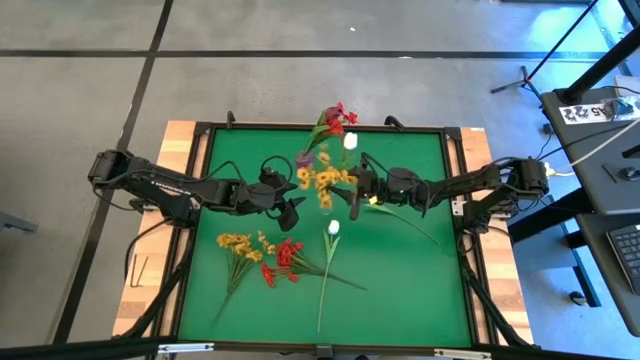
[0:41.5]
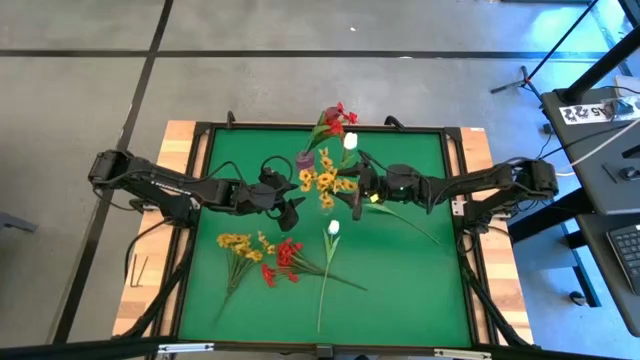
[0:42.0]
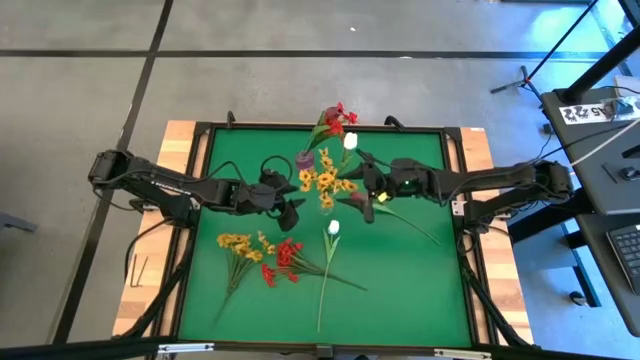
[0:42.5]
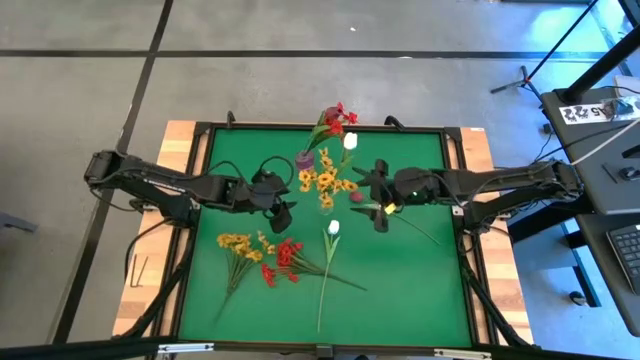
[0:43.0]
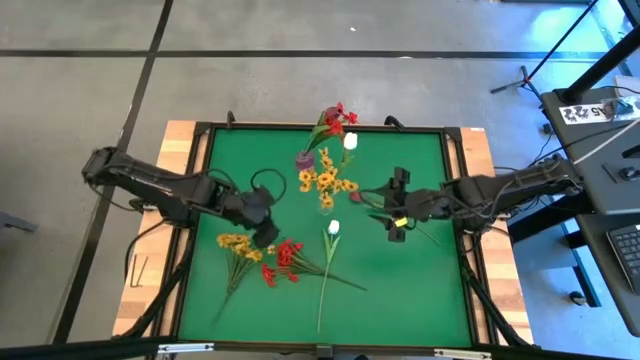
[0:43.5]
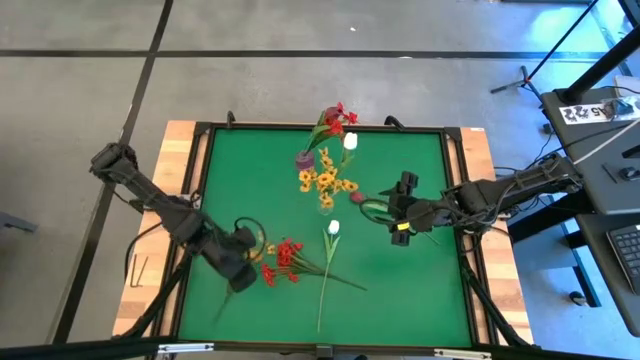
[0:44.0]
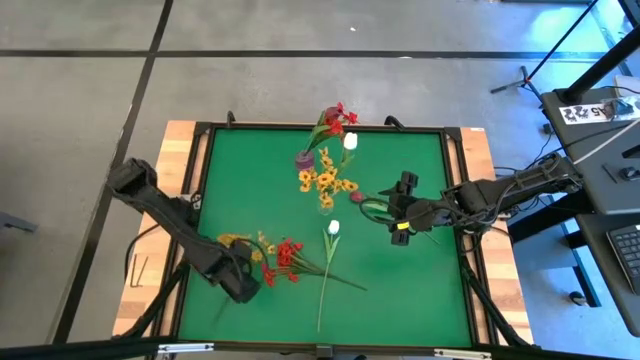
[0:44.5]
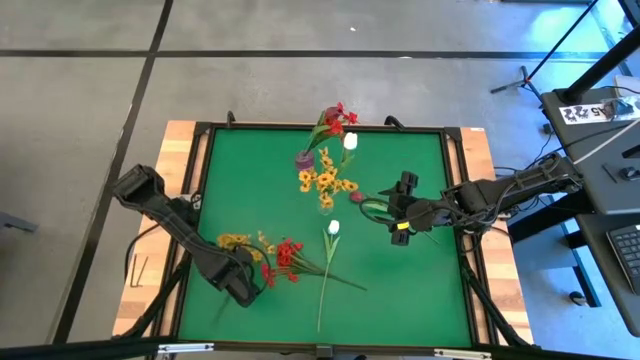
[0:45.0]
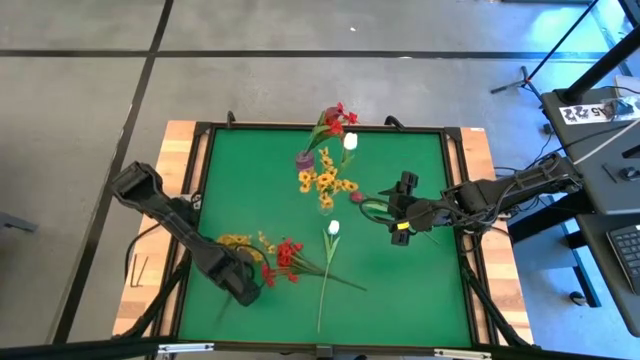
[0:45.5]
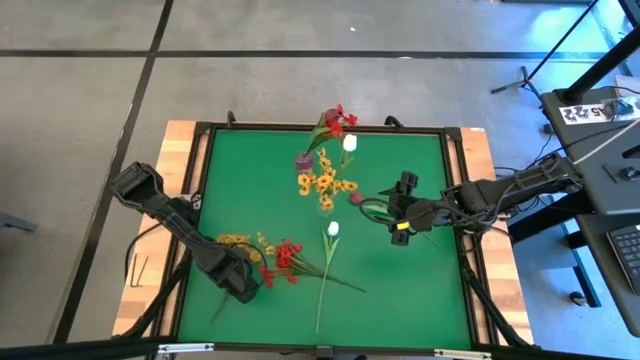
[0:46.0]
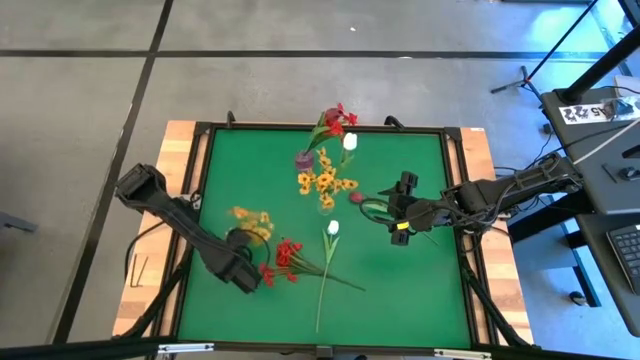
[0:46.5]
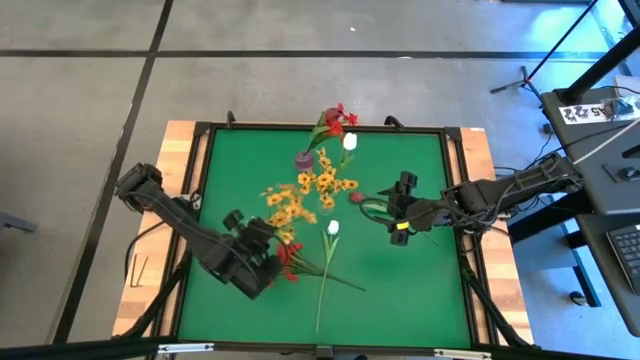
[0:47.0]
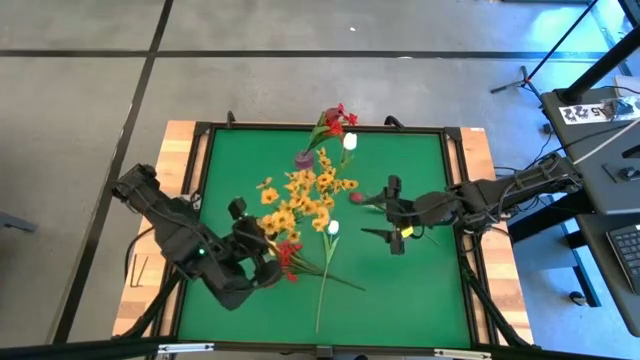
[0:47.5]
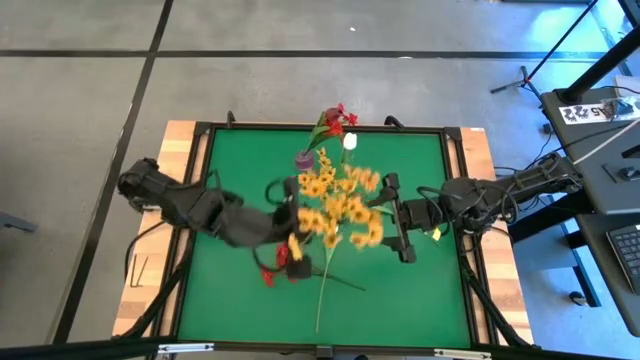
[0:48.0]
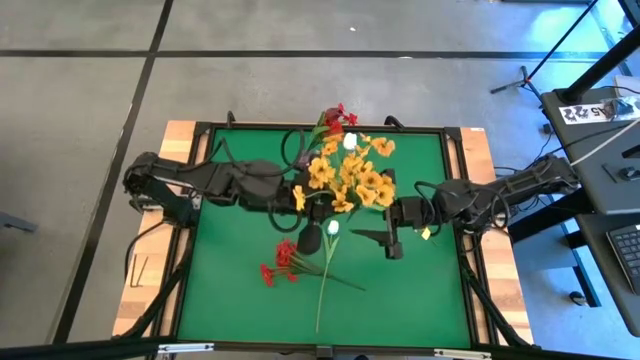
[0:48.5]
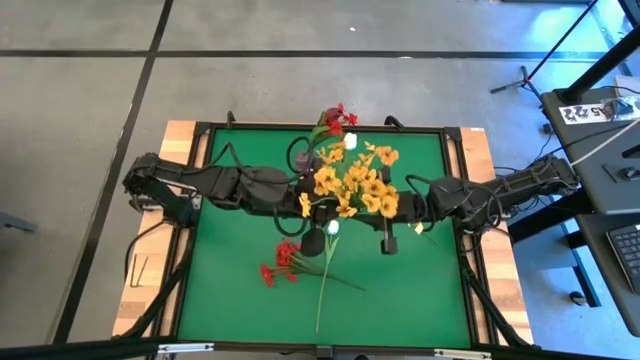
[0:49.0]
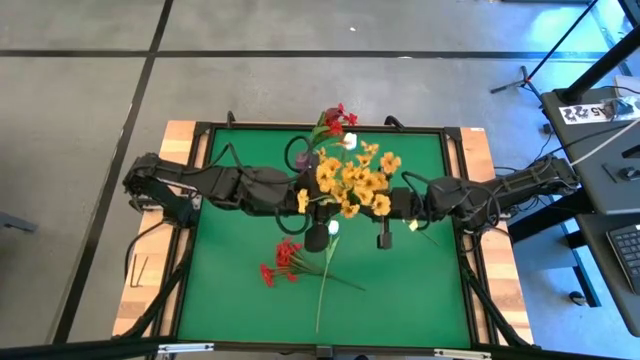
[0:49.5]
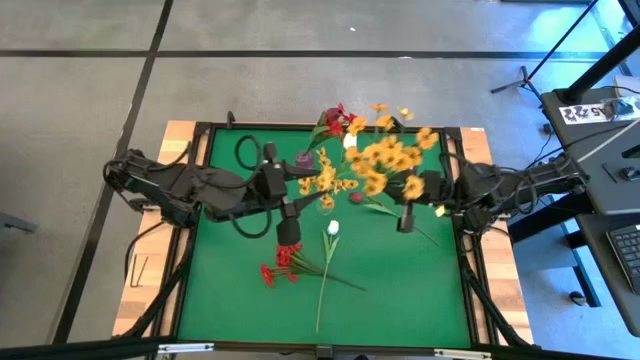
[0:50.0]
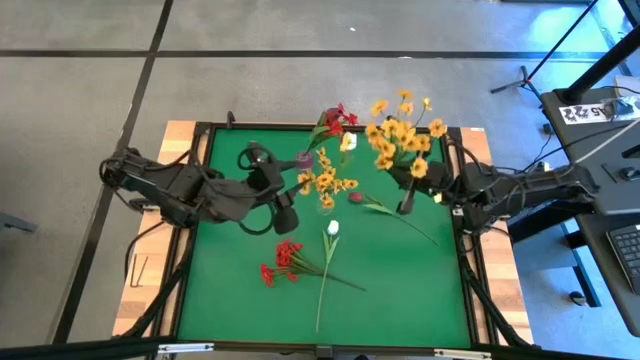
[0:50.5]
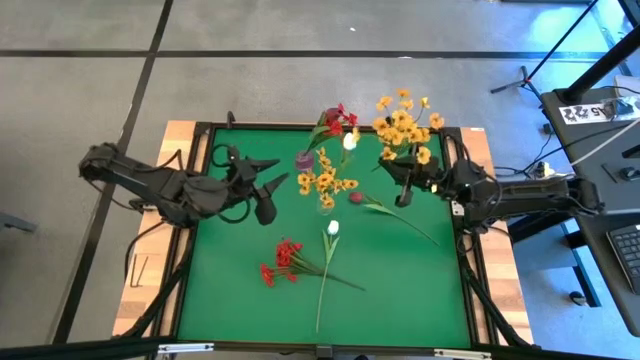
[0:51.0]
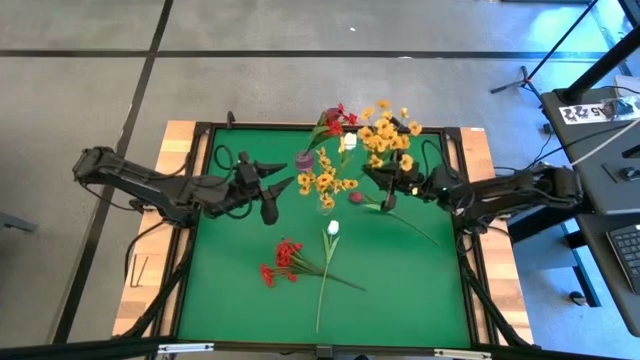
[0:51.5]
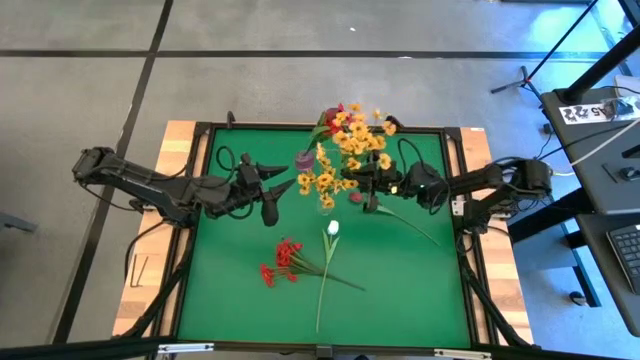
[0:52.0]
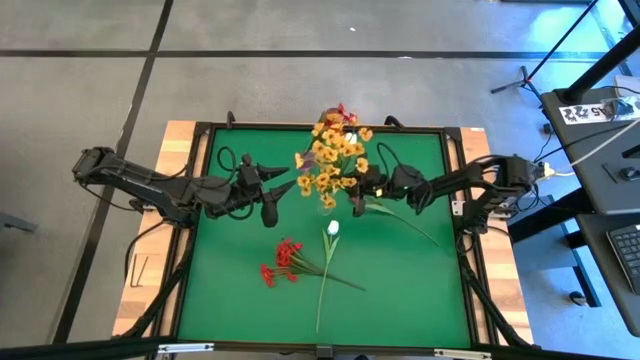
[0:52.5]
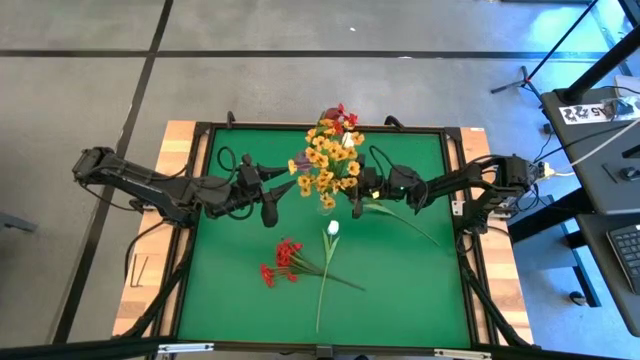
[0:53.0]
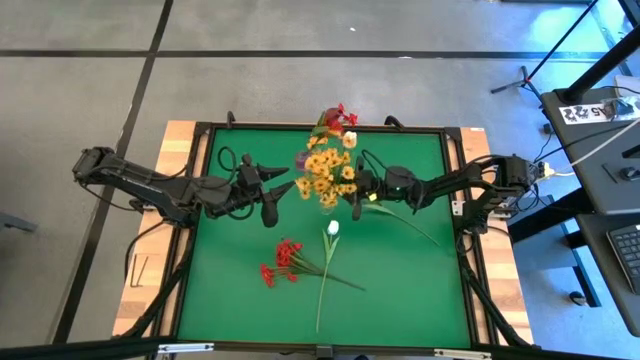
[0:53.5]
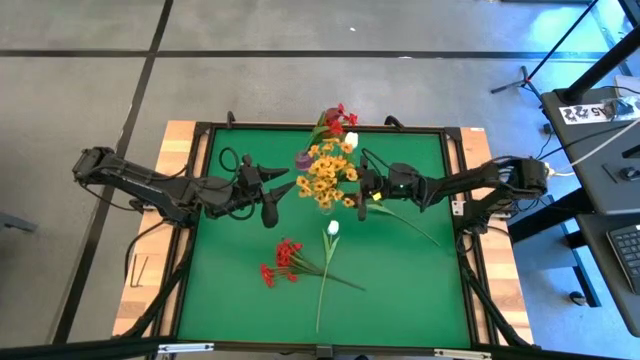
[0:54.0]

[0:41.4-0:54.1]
Task: Sort flowers into vase by color
Put the yellow flowers into the transparent vase

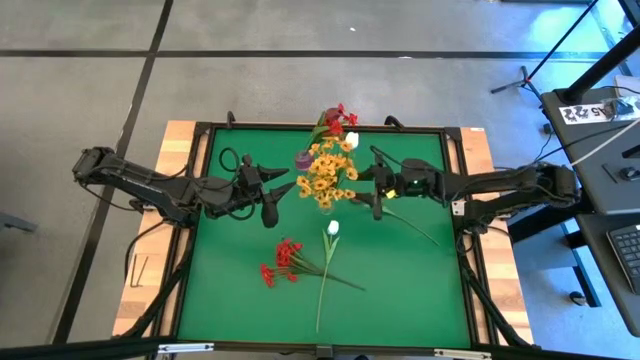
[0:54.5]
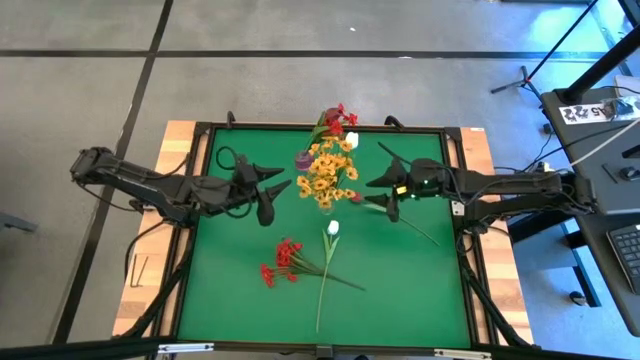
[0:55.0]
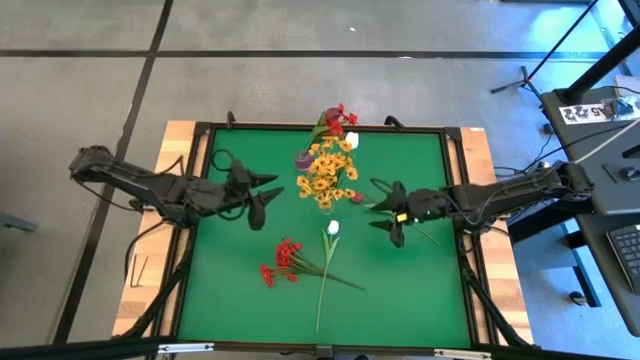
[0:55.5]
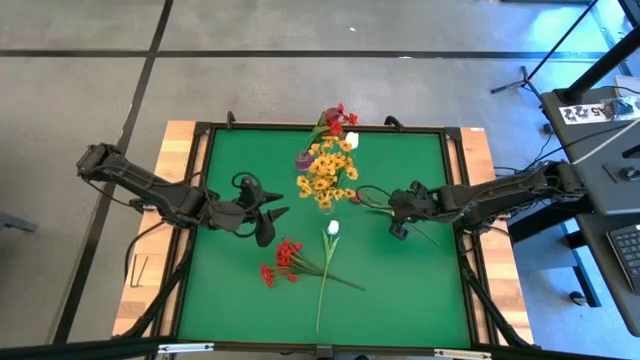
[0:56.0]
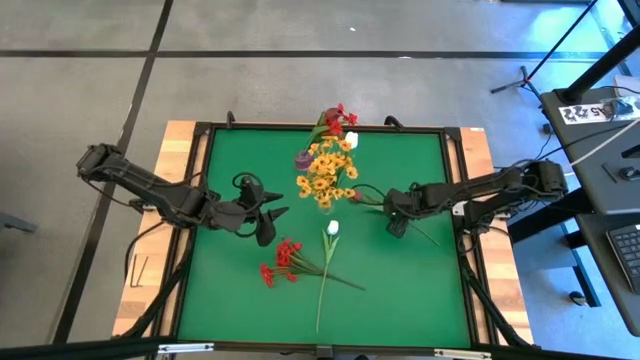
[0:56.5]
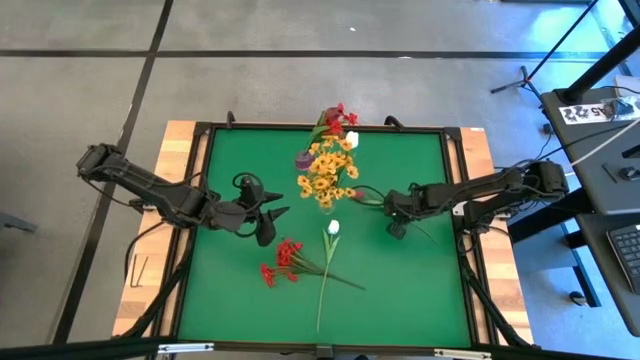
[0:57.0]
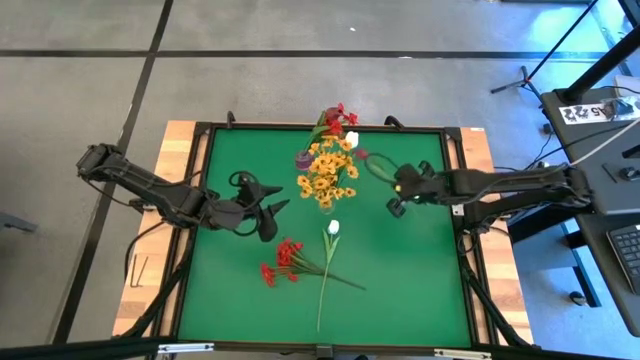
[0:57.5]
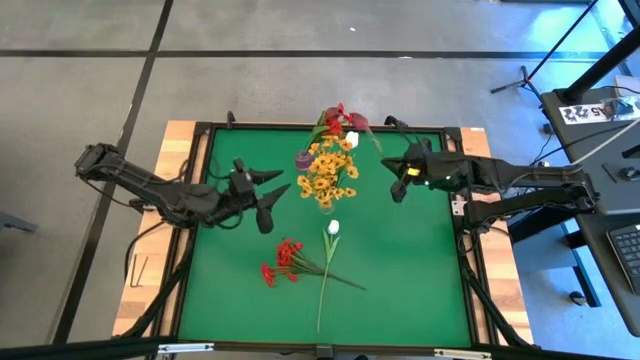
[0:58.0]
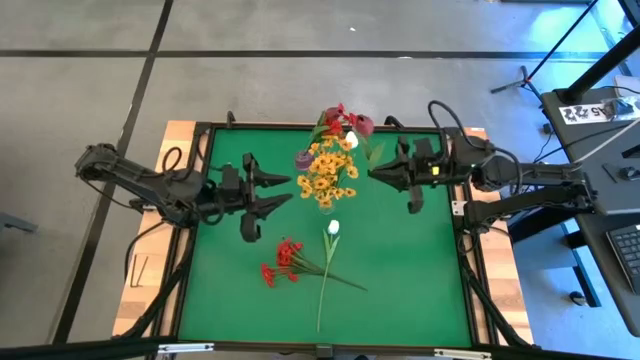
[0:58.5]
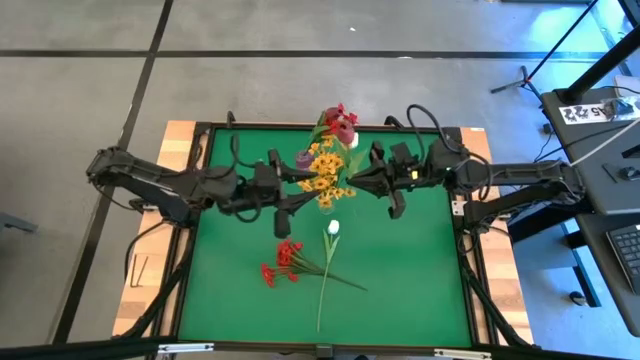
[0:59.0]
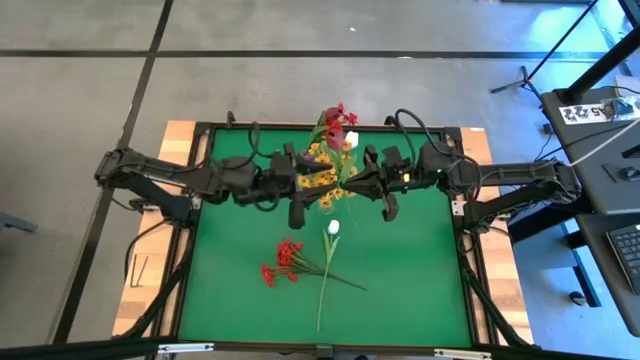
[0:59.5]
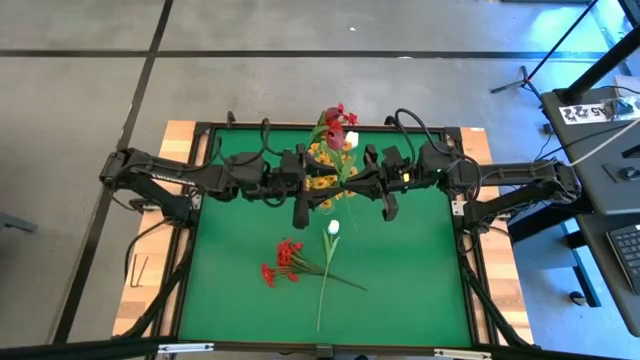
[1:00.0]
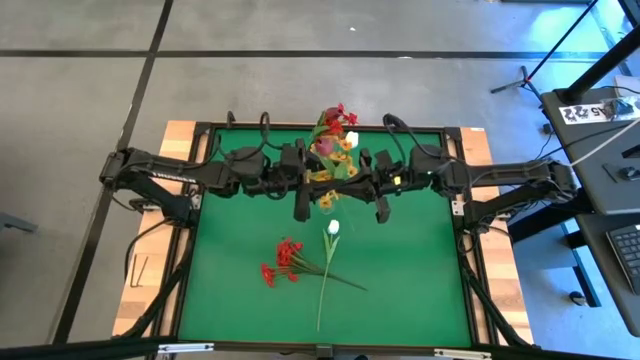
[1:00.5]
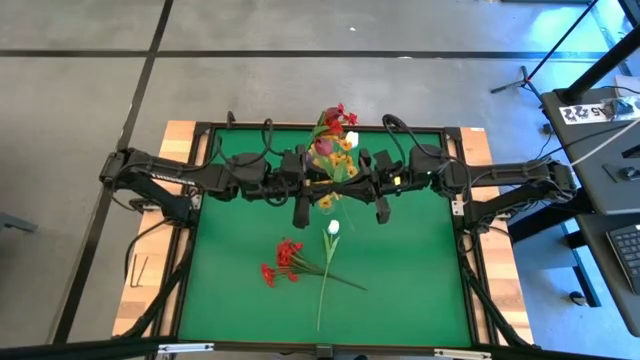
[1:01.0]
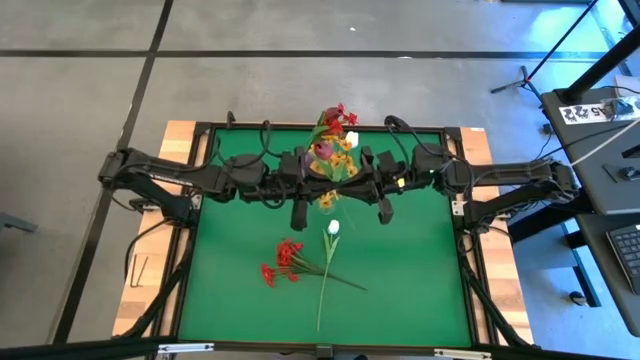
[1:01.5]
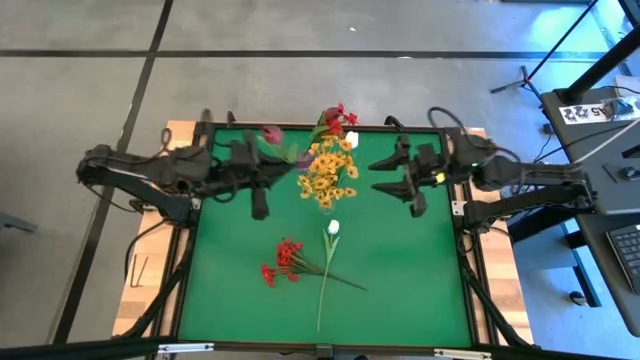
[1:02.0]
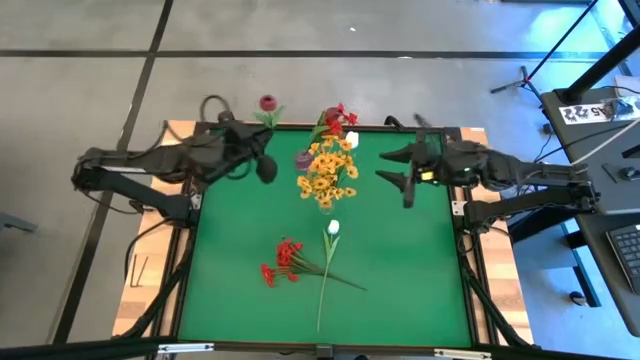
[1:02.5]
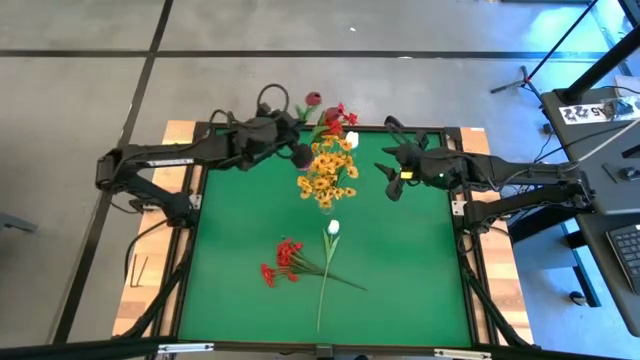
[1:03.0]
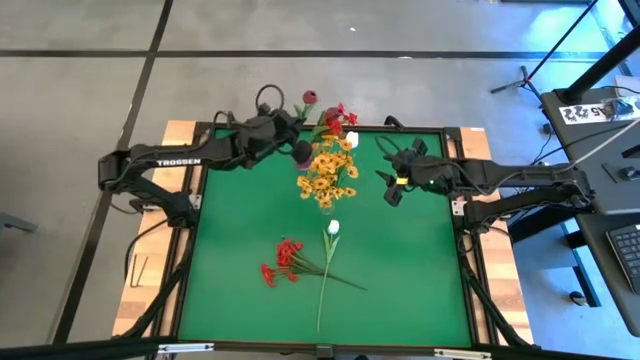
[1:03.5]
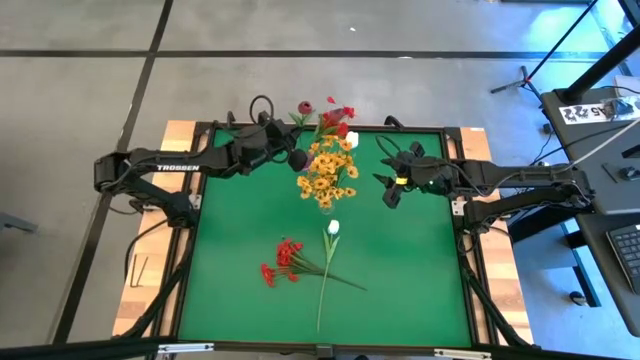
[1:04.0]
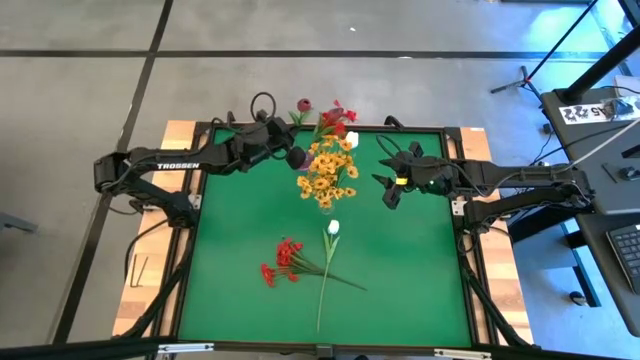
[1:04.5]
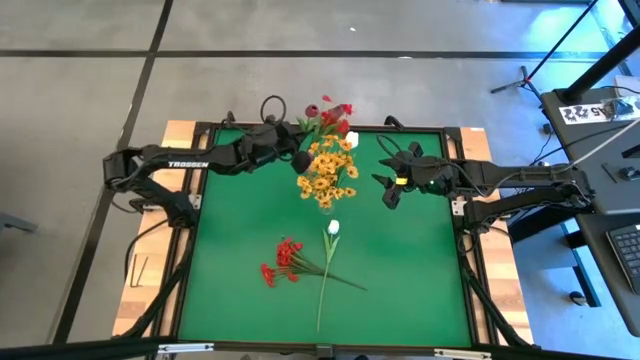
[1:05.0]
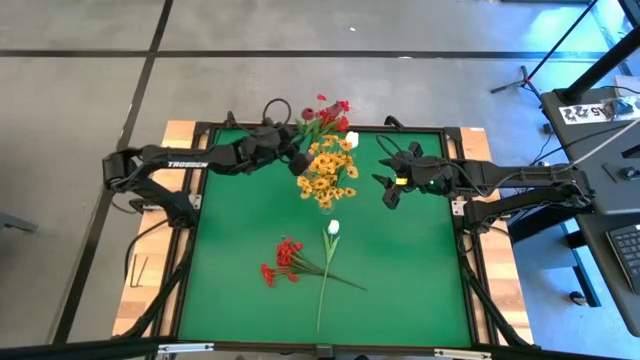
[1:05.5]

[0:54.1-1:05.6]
Put the dark red flower into the purple vase
